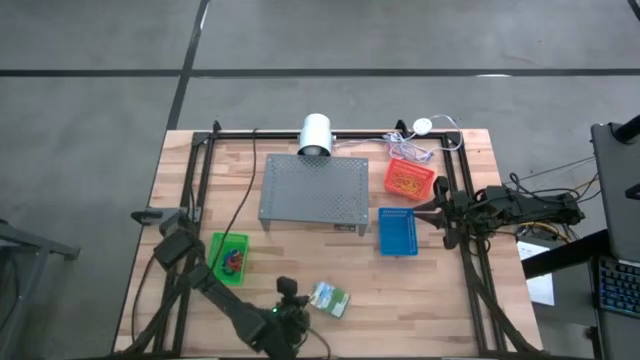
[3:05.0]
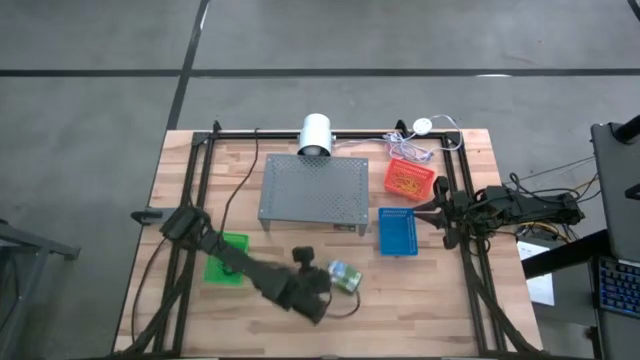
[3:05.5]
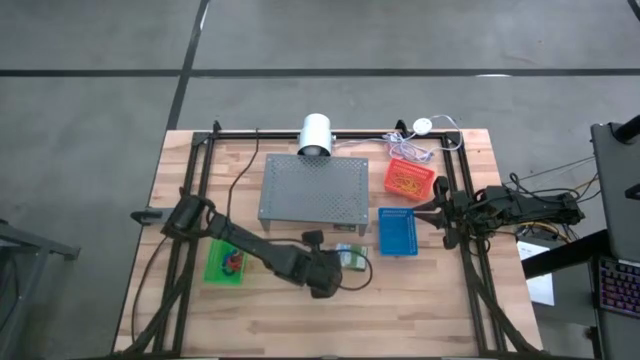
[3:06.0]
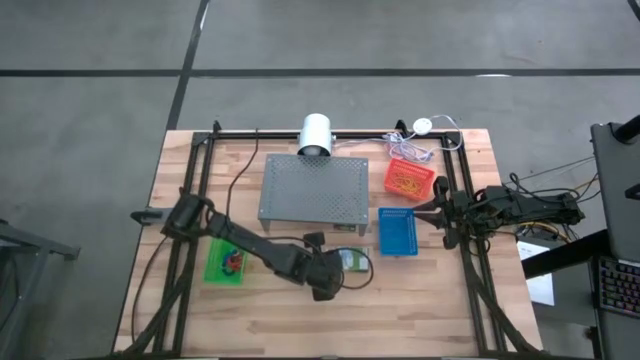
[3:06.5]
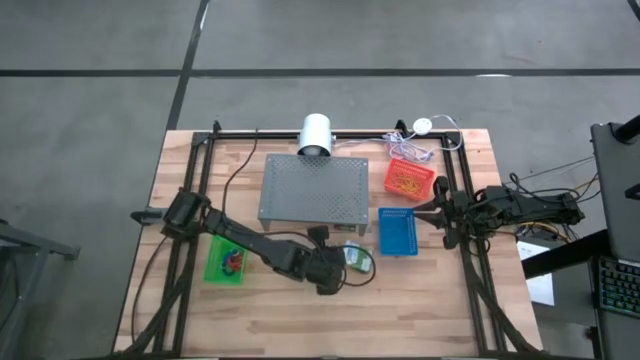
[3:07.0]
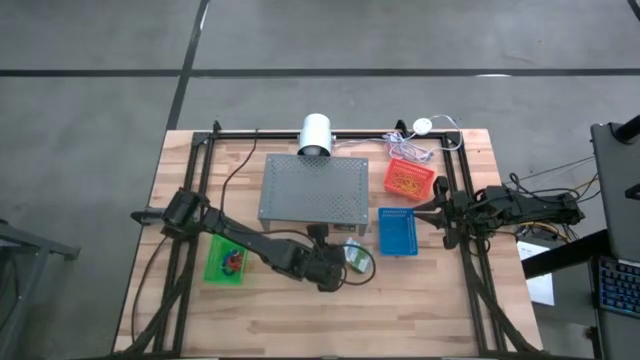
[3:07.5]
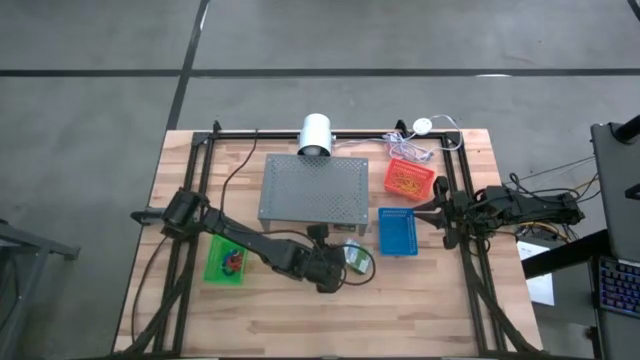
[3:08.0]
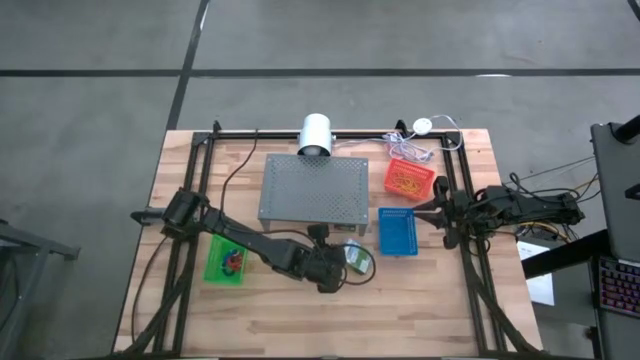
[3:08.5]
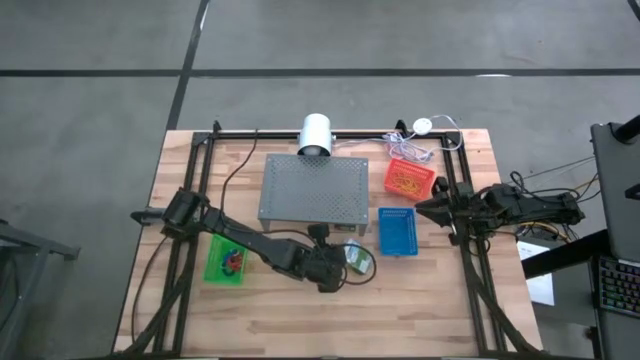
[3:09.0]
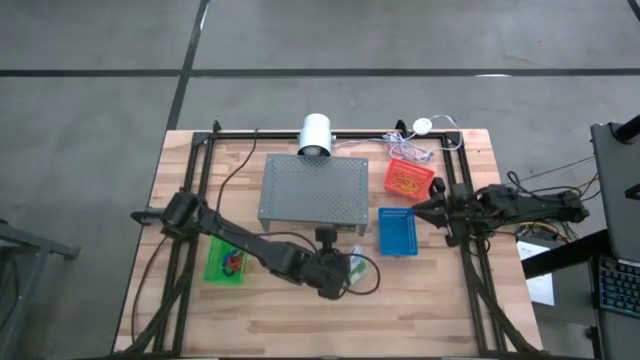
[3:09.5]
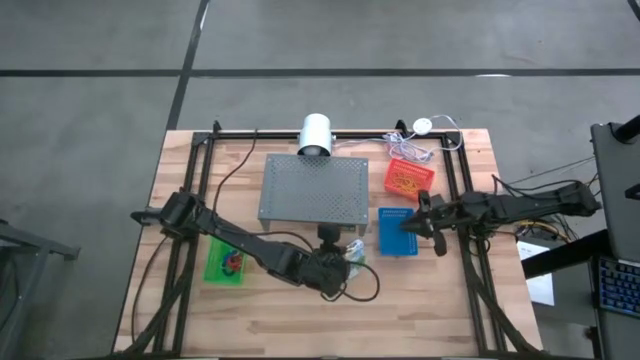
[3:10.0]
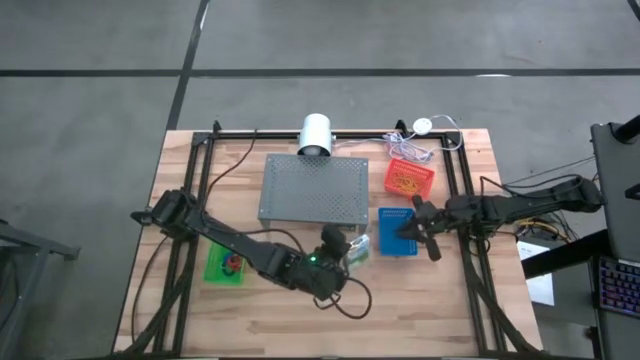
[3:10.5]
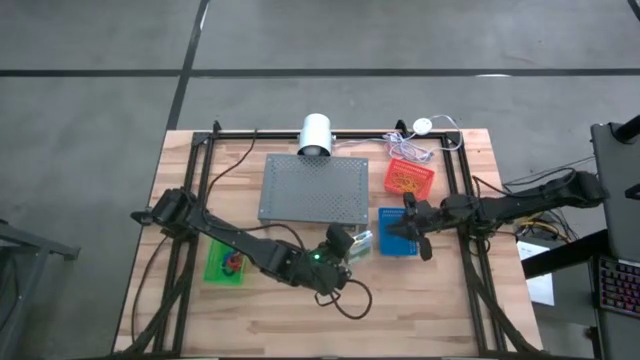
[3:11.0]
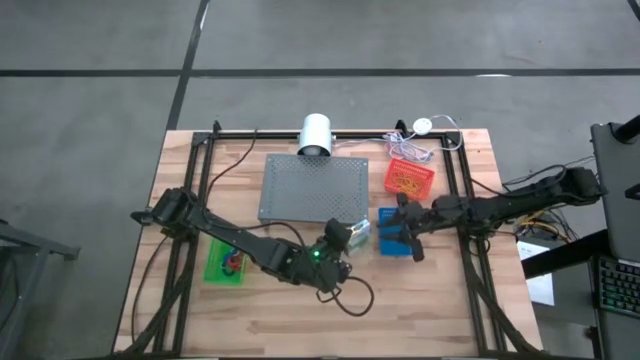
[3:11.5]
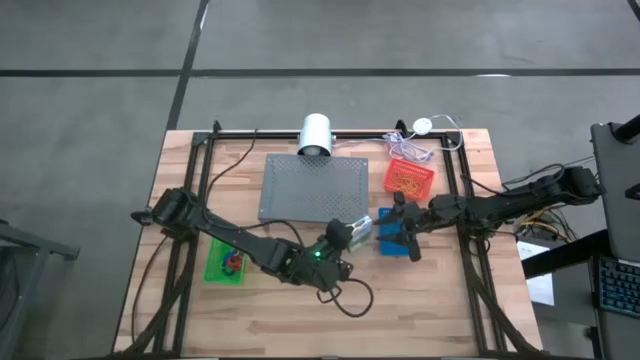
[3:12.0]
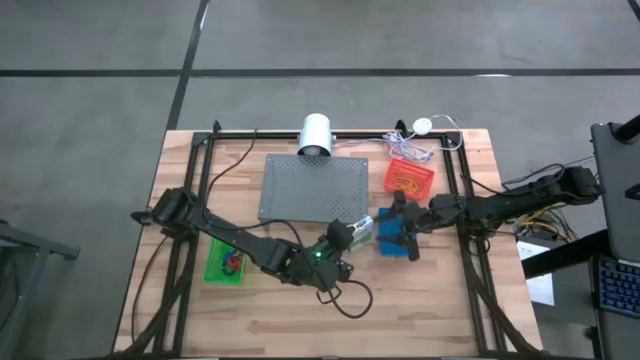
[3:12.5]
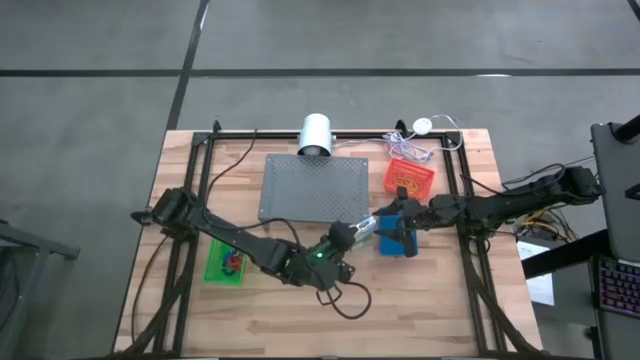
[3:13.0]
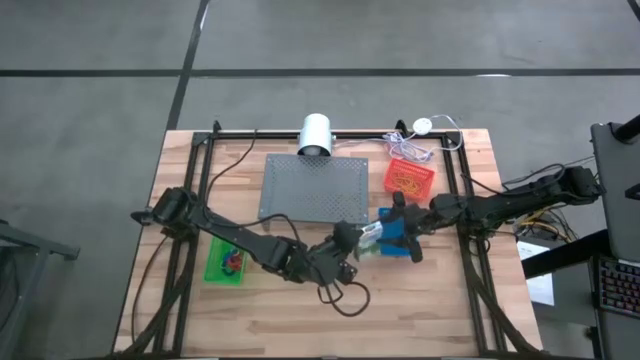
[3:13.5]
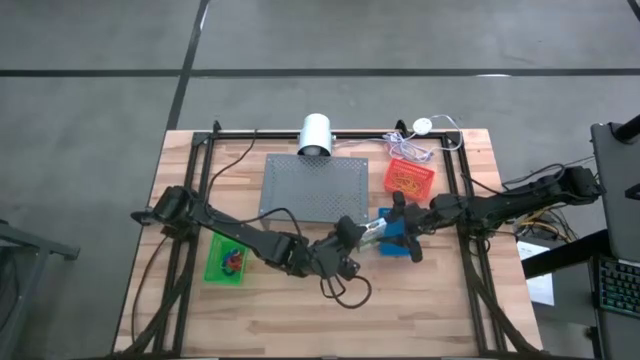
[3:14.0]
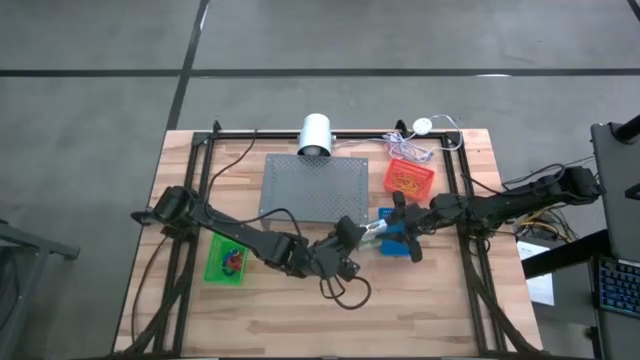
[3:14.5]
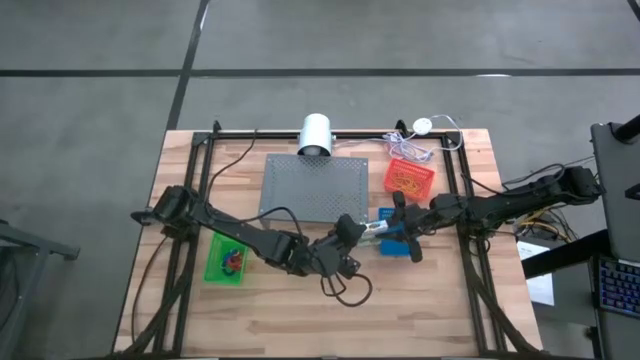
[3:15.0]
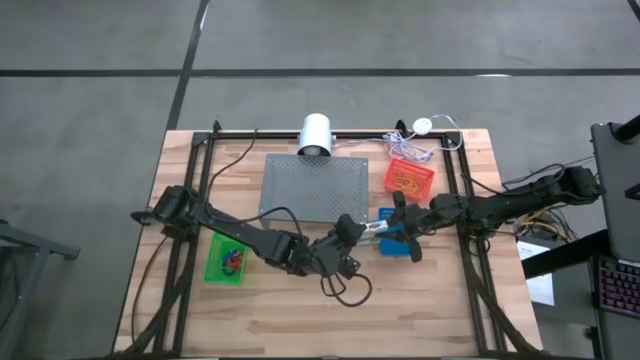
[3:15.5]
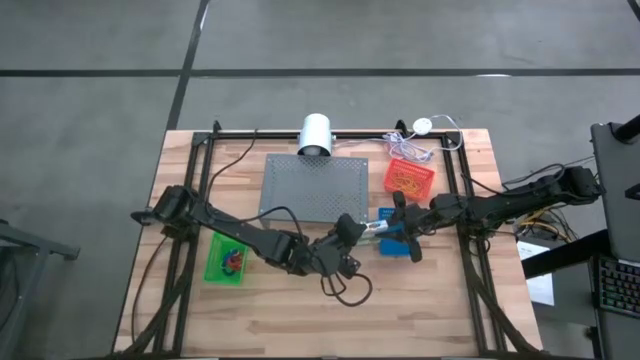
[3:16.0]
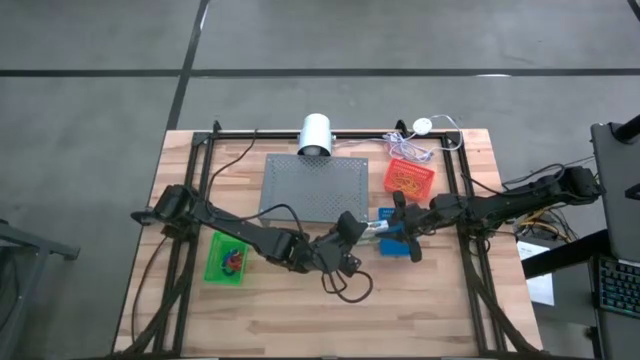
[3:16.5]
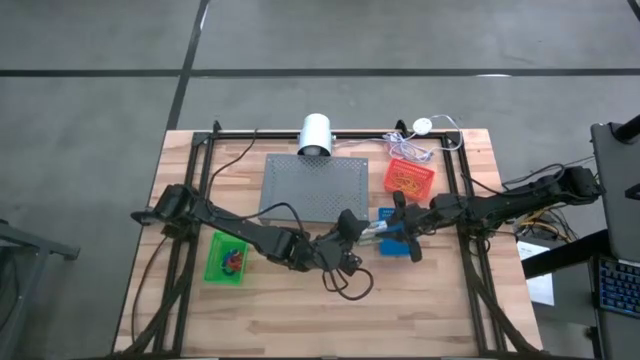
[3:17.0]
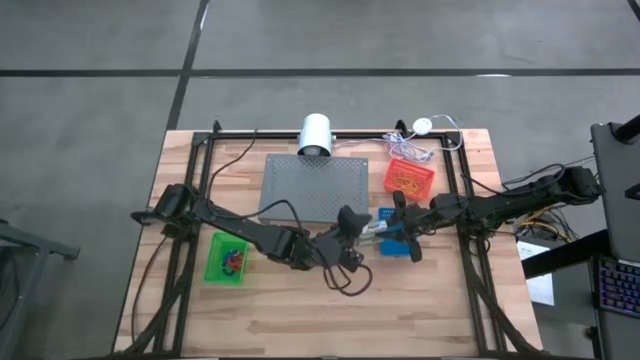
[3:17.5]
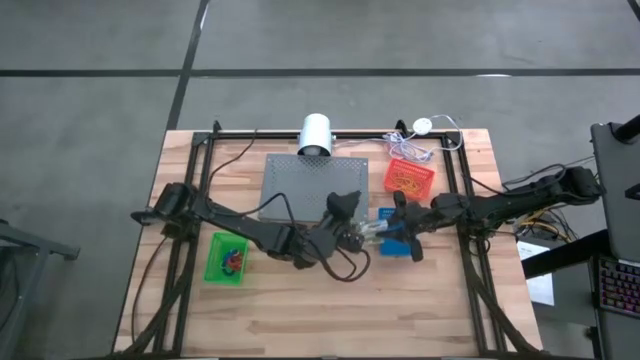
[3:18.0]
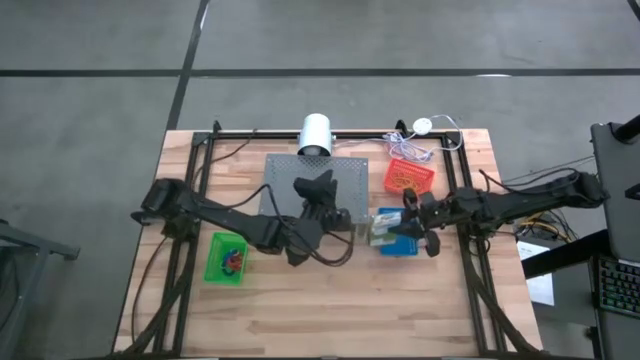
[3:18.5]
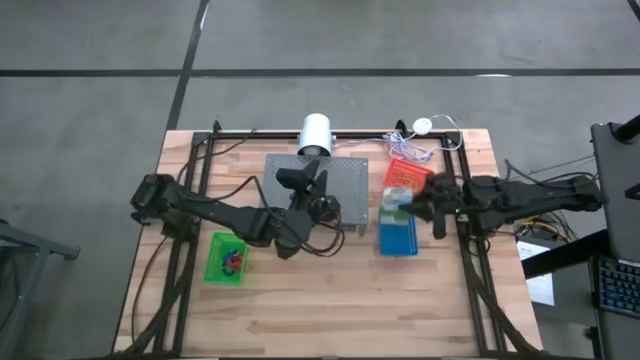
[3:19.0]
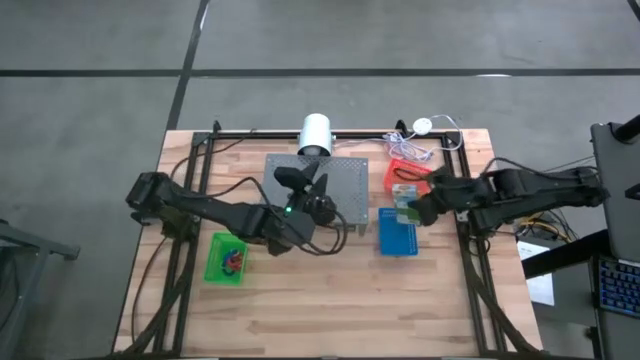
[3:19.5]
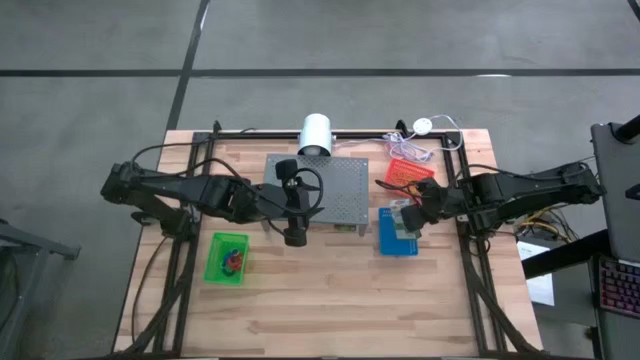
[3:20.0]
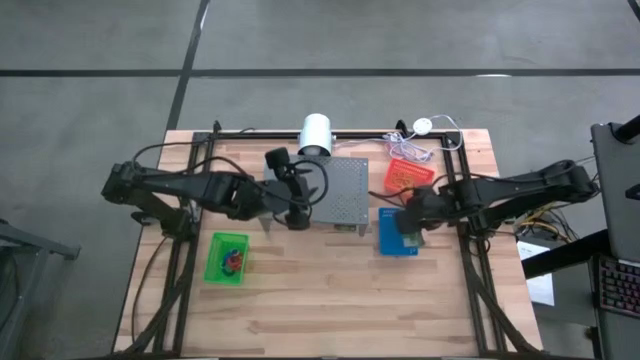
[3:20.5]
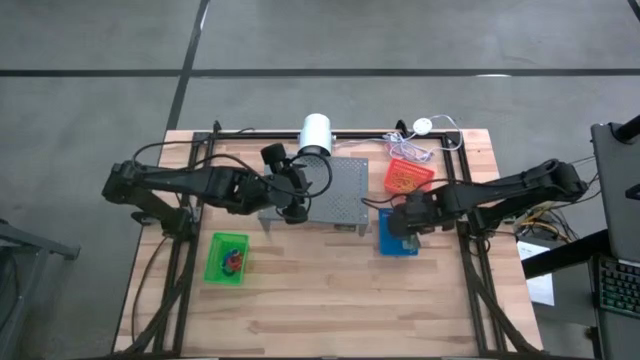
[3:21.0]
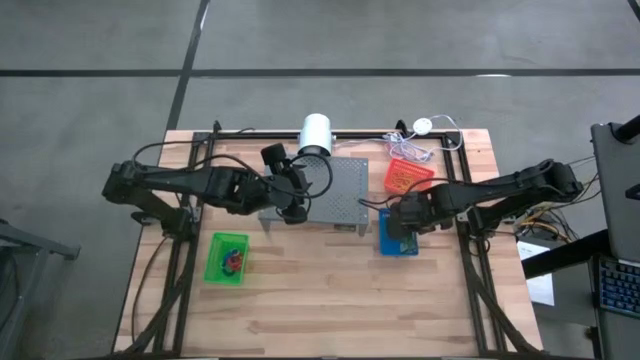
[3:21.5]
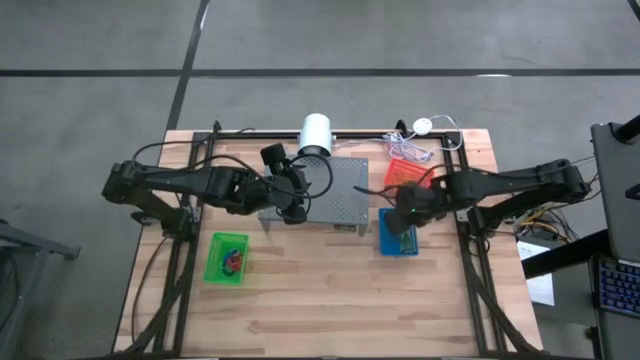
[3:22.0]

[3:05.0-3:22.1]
Task: Pick & Place Office Desk Supplies
Put the bottom pack of yellow crayons into the blue bin

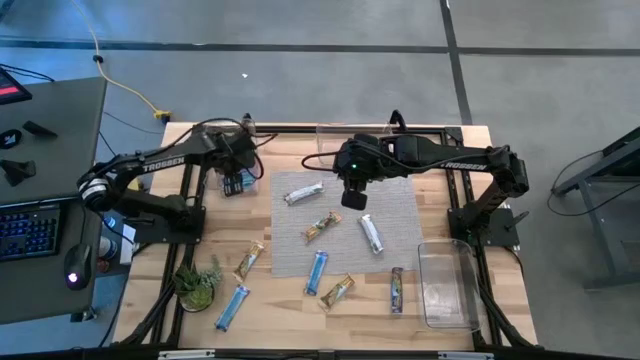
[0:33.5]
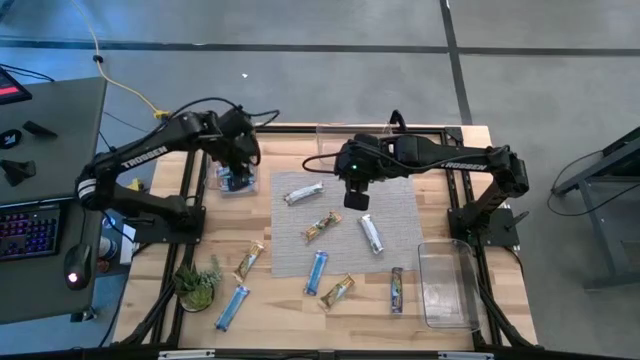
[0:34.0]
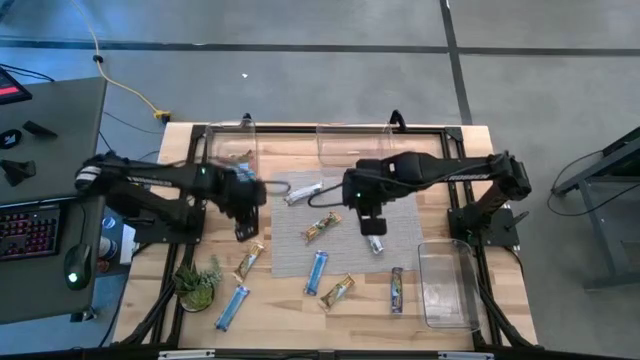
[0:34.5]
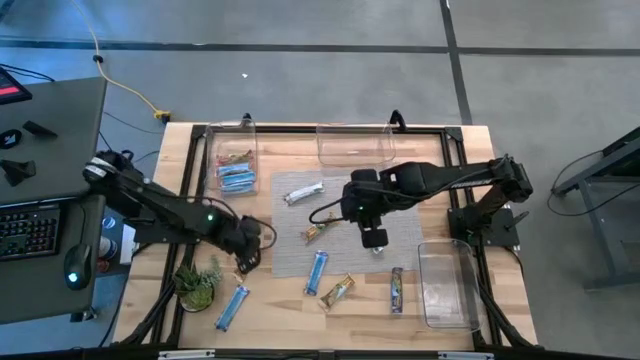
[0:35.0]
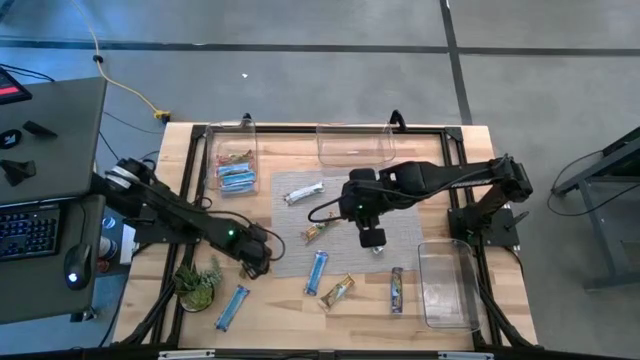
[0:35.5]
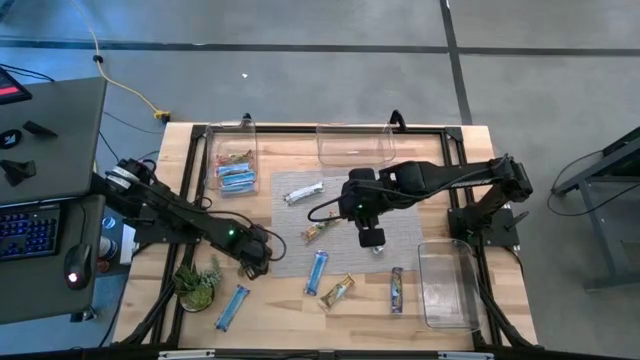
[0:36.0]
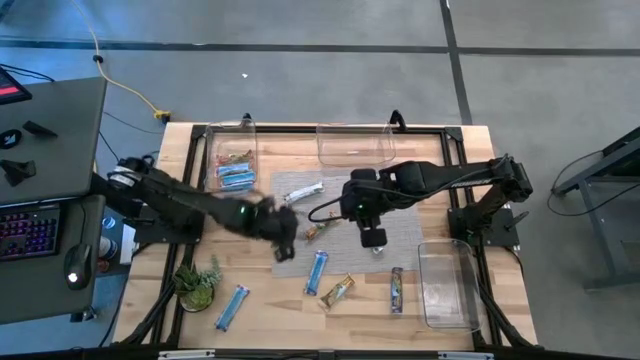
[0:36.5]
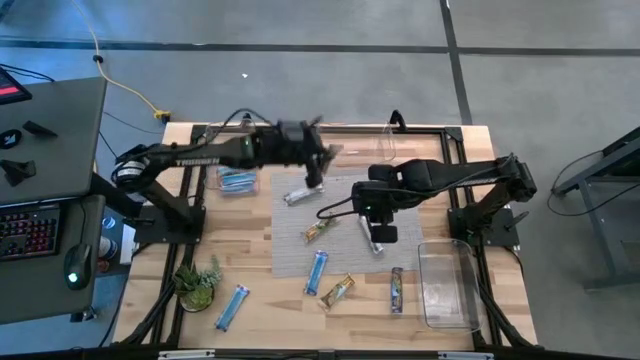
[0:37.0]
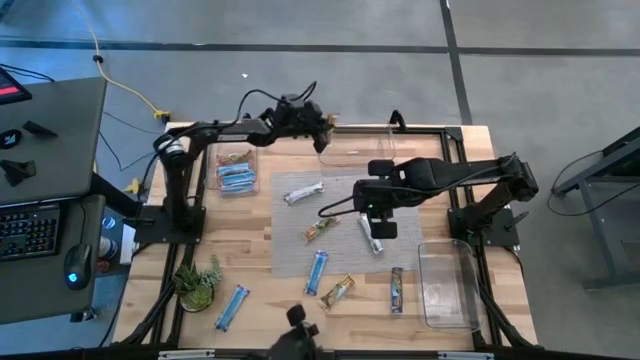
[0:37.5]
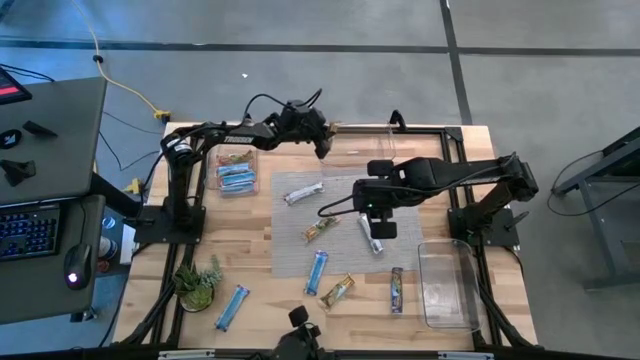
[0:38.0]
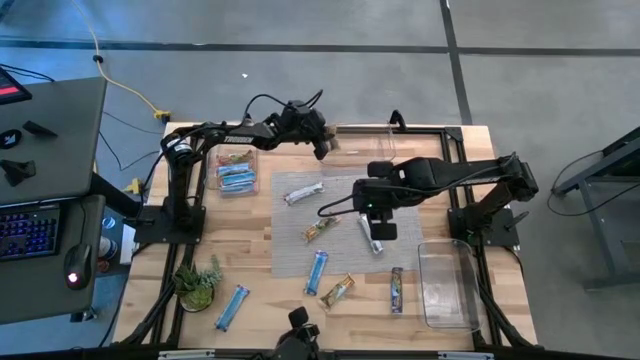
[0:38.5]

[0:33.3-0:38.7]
Task: Pick and place Granola Bars by type
Put the yellow granola bar into the top right transparent bin
